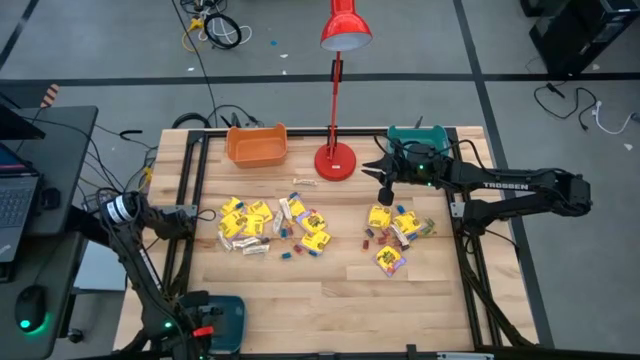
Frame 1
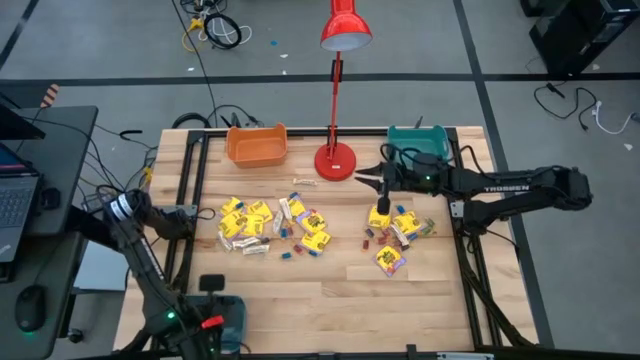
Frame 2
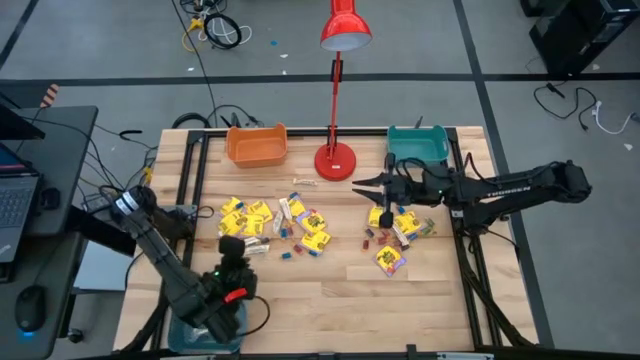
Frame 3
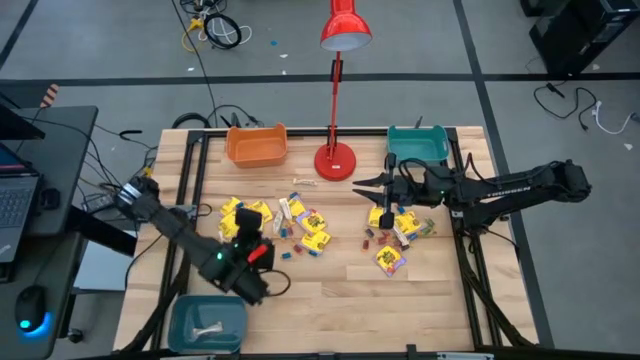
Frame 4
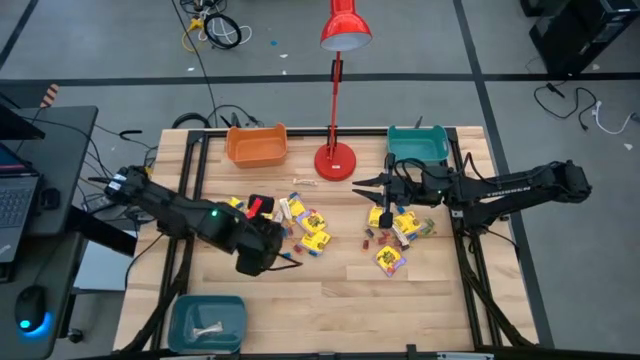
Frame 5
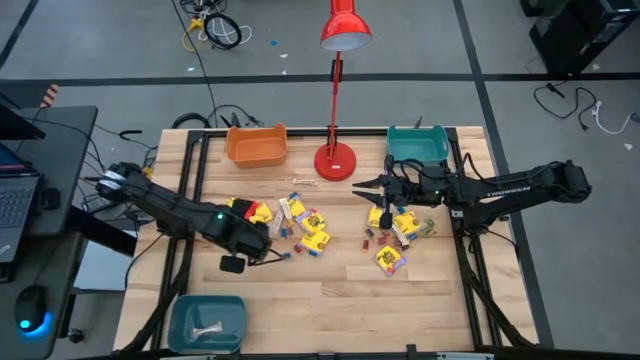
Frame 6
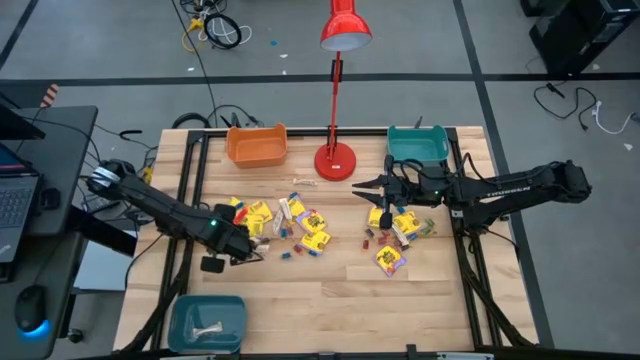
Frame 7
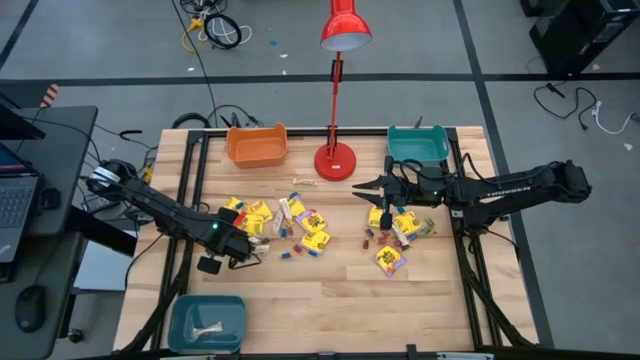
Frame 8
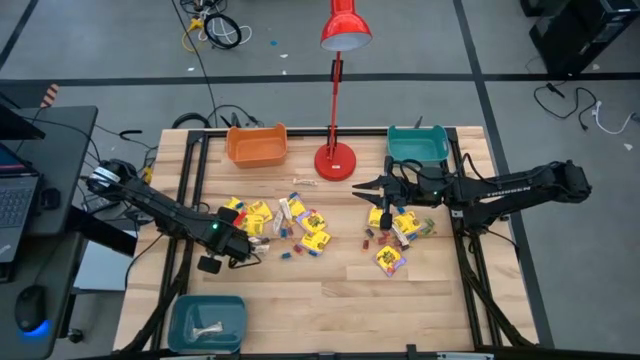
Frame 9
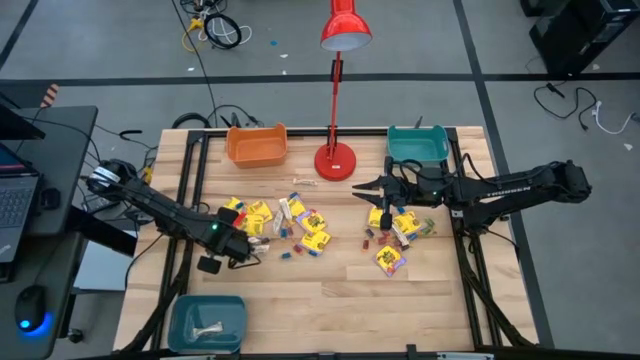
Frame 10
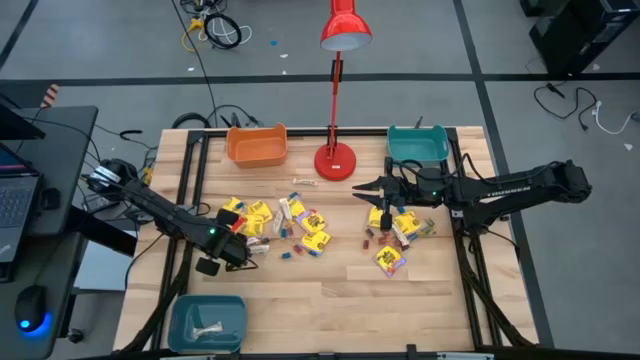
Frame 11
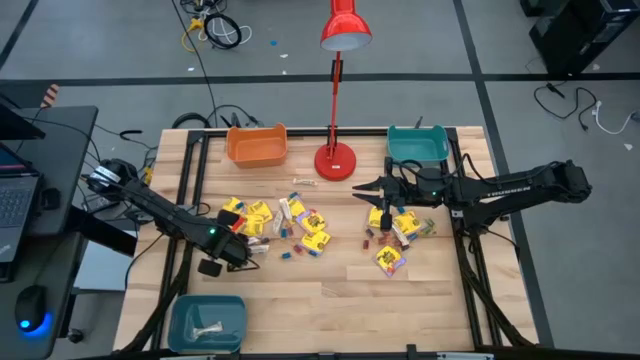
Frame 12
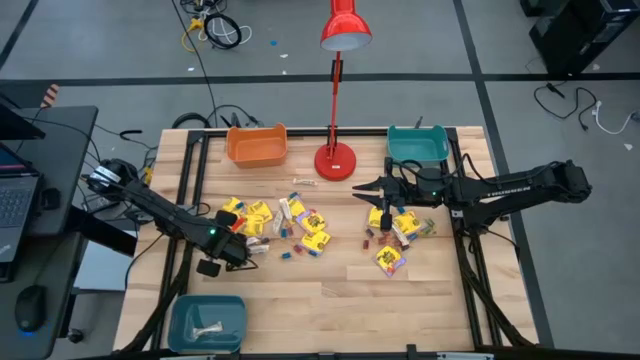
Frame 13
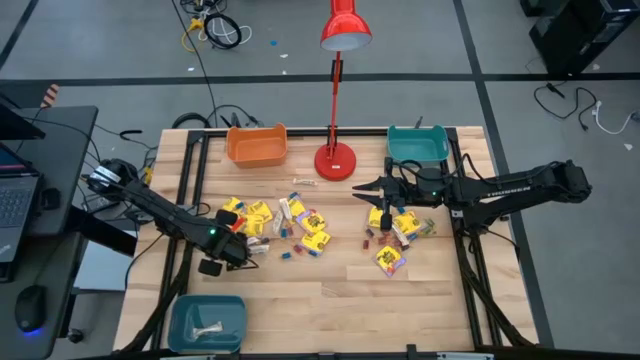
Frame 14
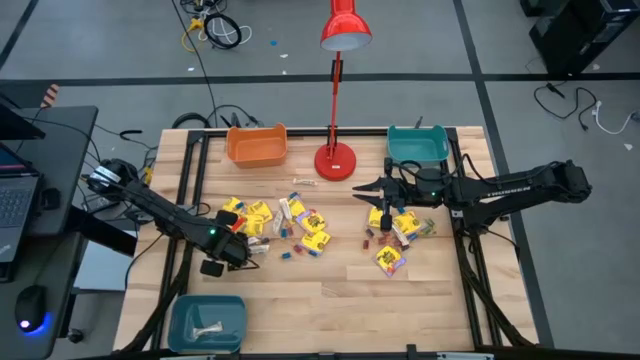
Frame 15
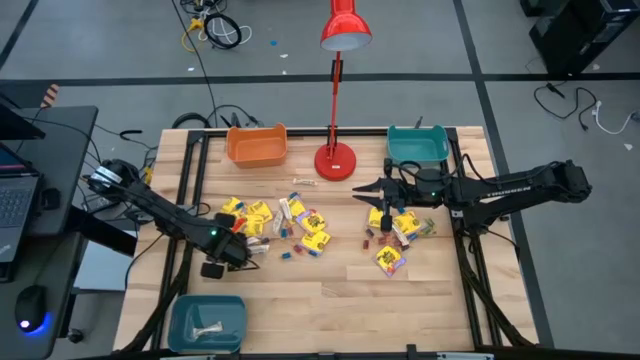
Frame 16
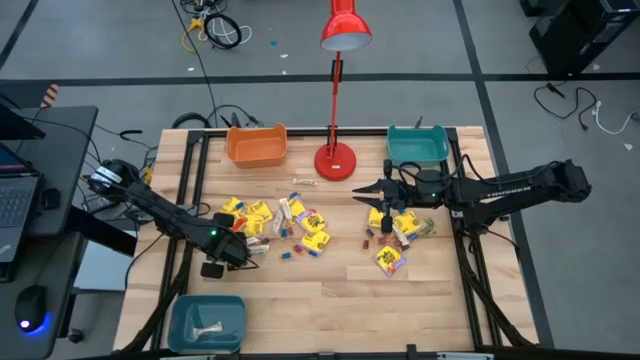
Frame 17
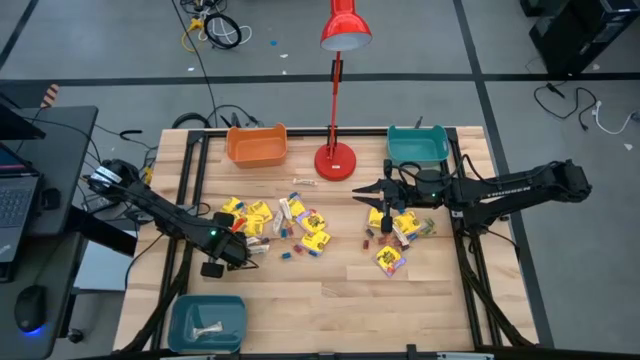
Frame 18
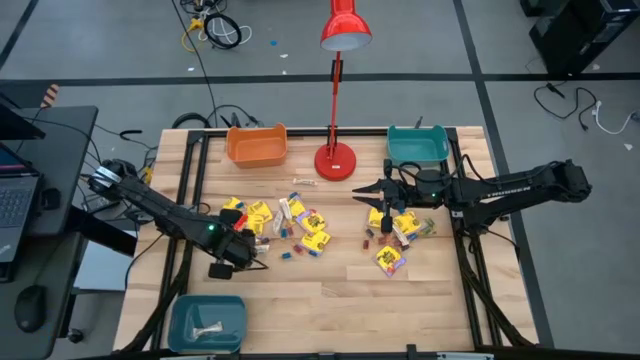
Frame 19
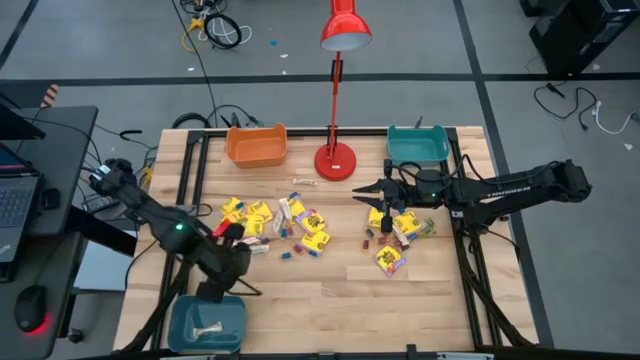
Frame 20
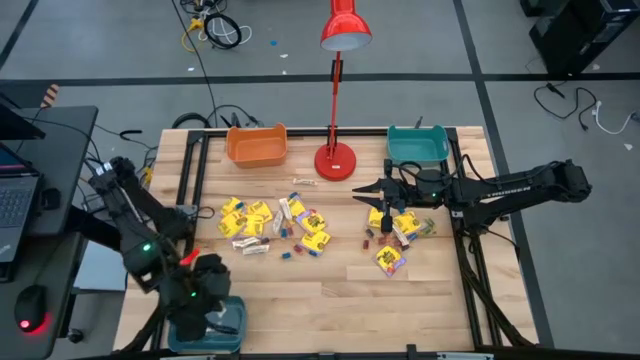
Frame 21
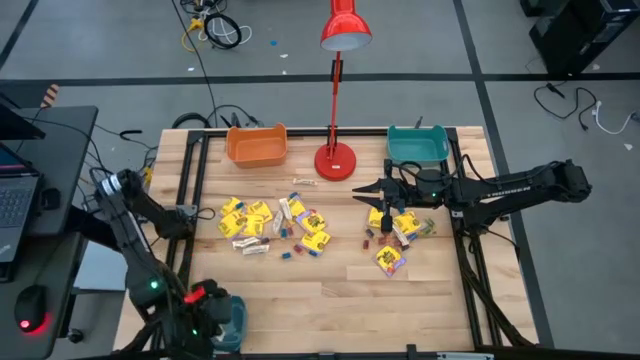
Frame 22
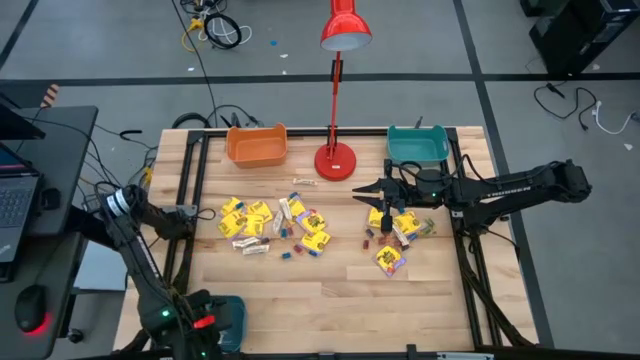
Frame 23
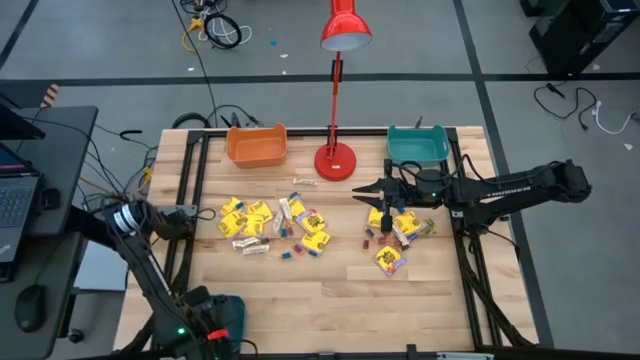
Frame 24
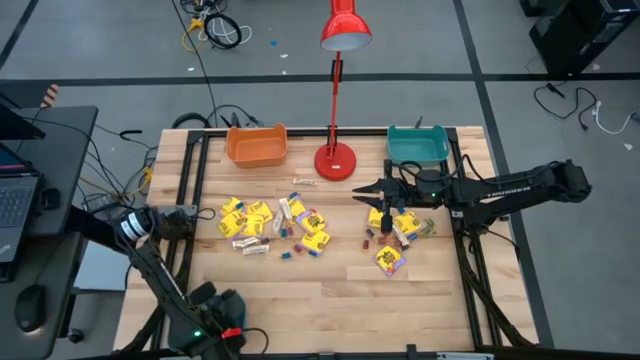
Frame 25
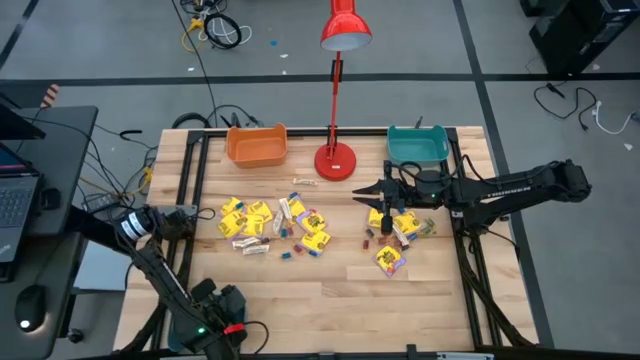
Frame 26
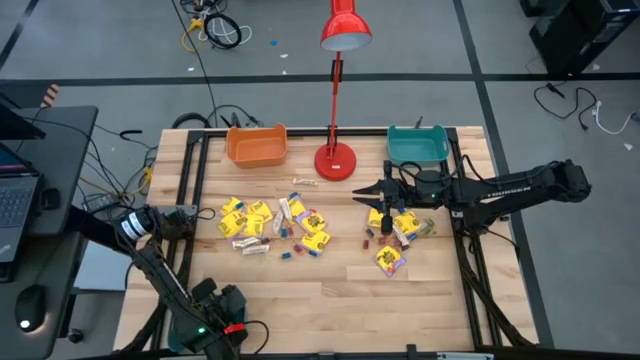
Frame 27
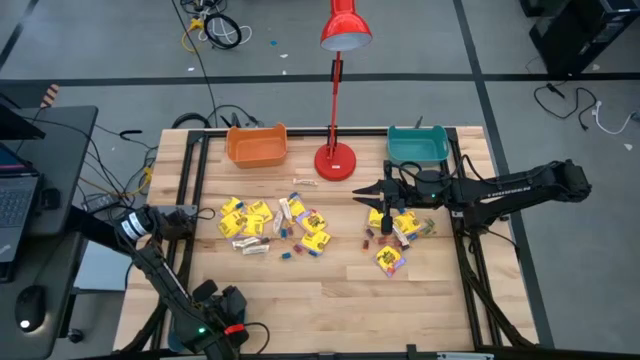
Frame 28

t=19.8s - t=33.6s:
Task: Sort candy
Put the white candy into the blue bin

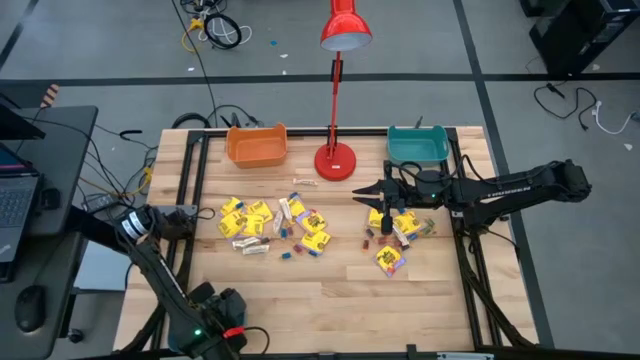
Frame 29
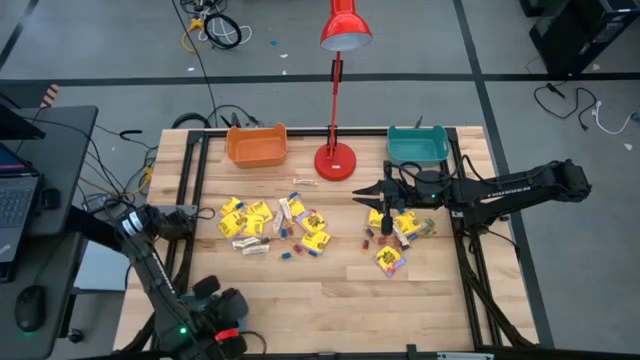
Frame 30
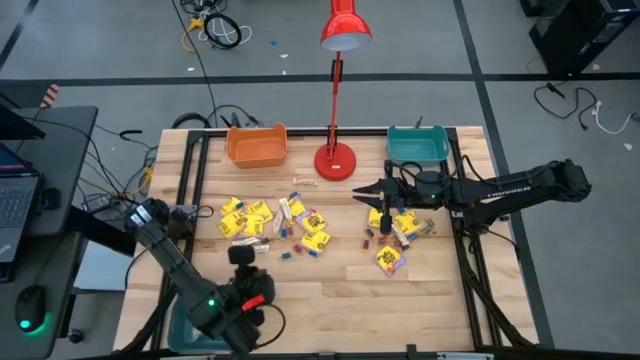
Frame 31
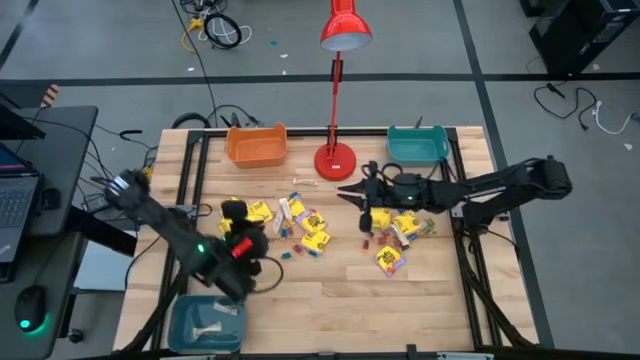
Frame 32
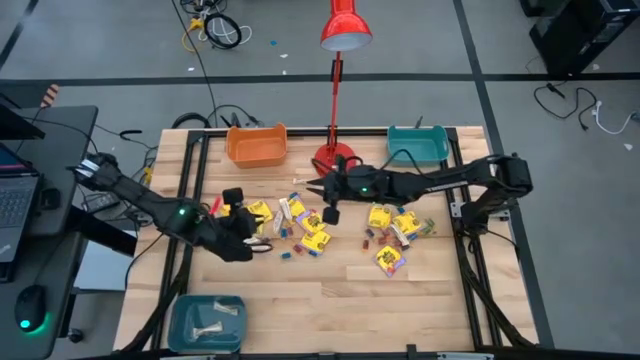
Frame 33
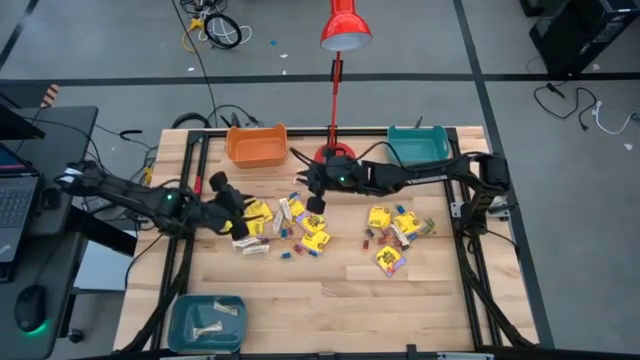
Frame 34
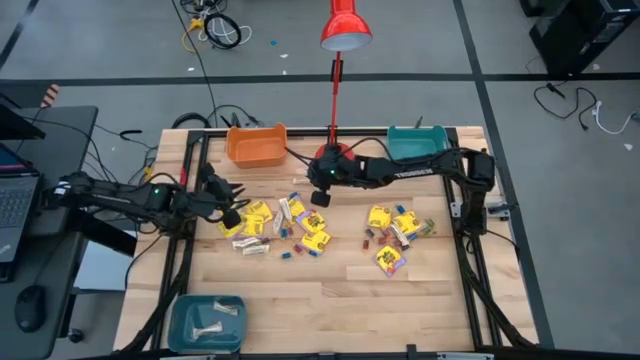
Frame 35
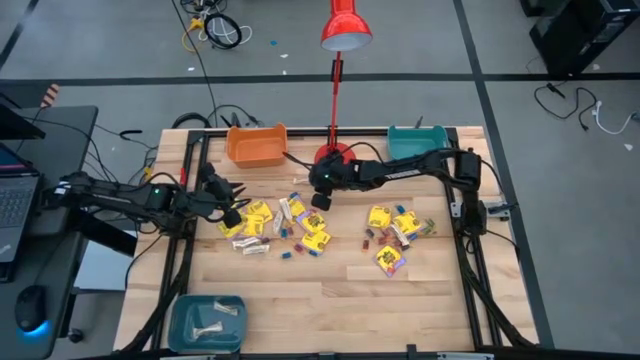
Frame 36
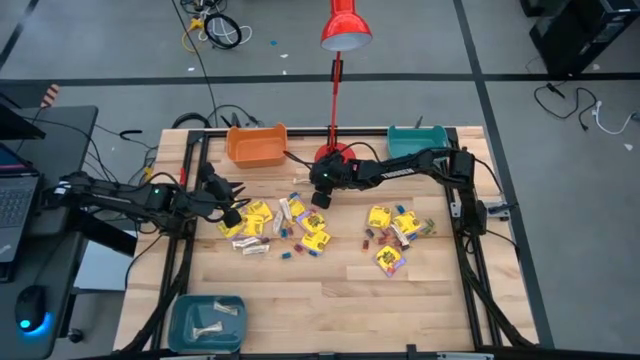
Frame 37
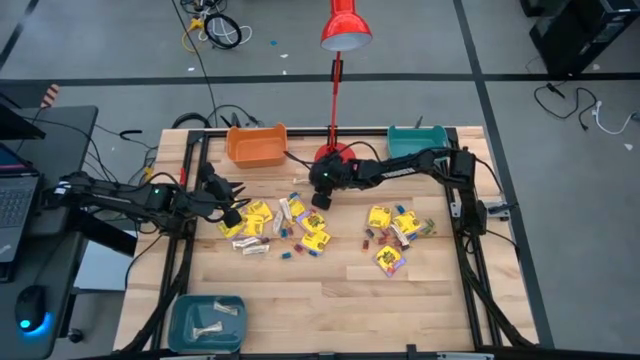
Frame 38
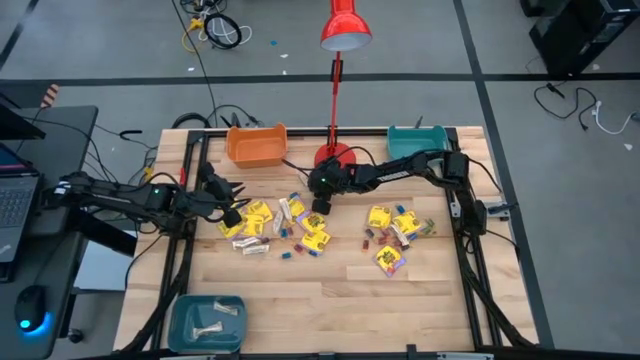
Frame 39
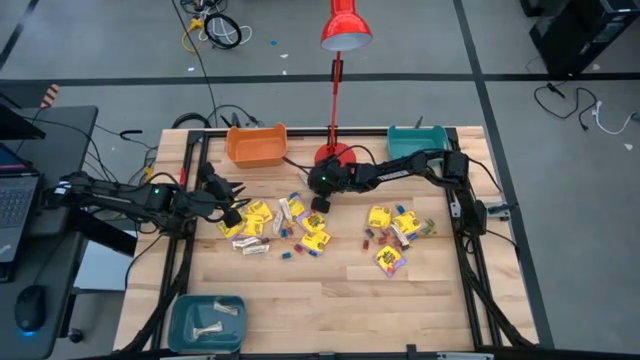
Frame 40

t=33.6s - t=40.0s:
Put the white candy into the blue bin
